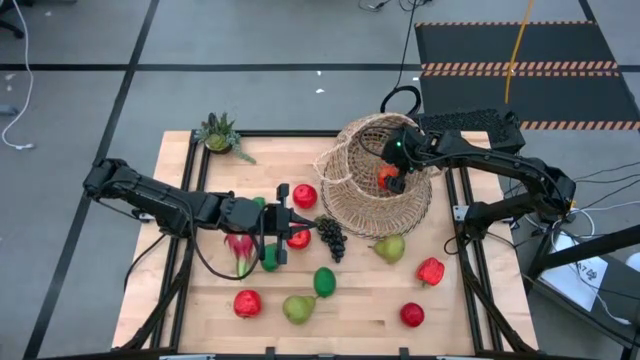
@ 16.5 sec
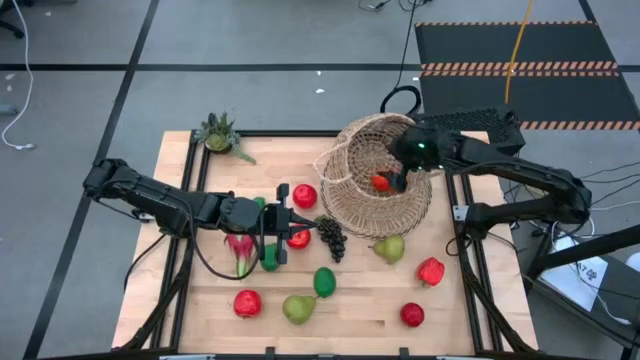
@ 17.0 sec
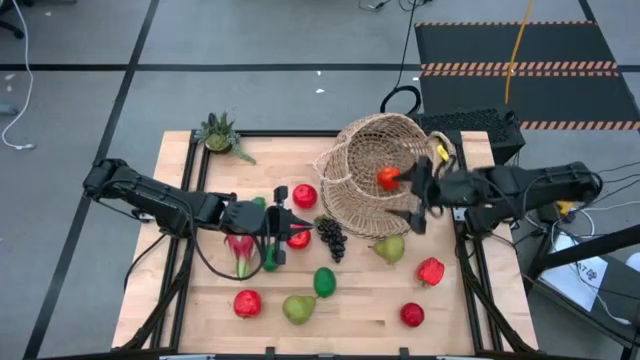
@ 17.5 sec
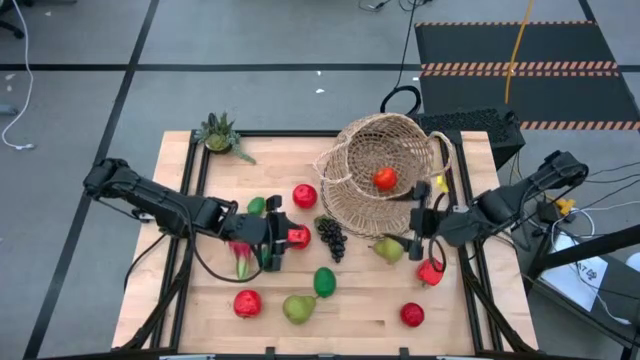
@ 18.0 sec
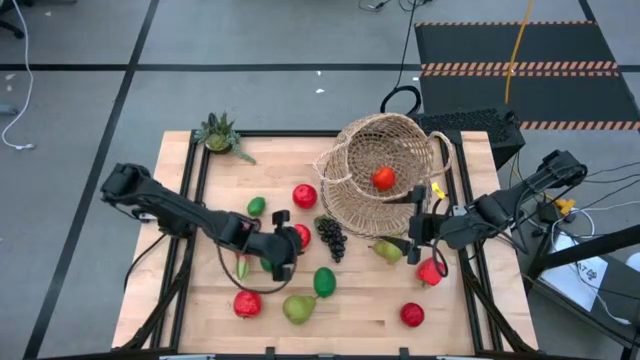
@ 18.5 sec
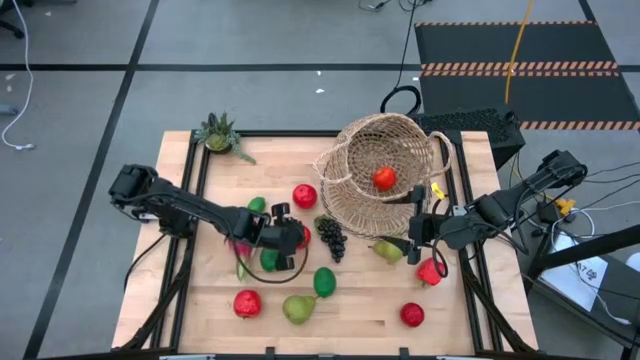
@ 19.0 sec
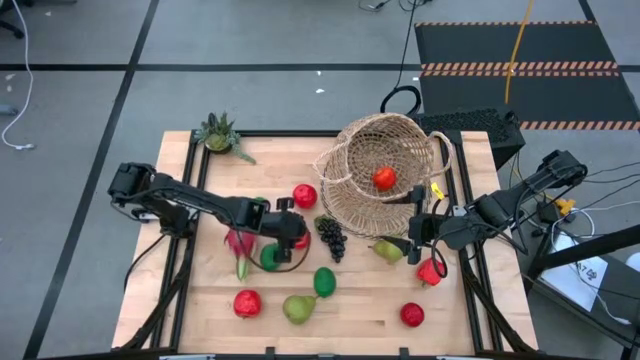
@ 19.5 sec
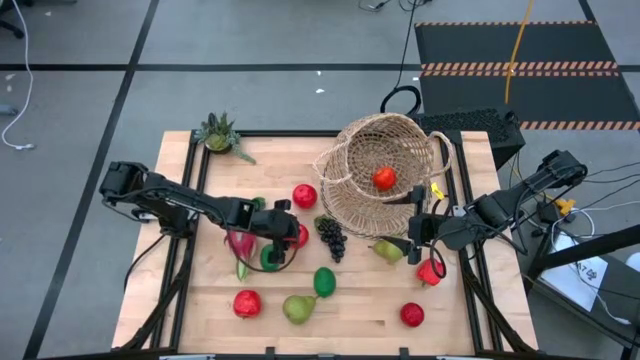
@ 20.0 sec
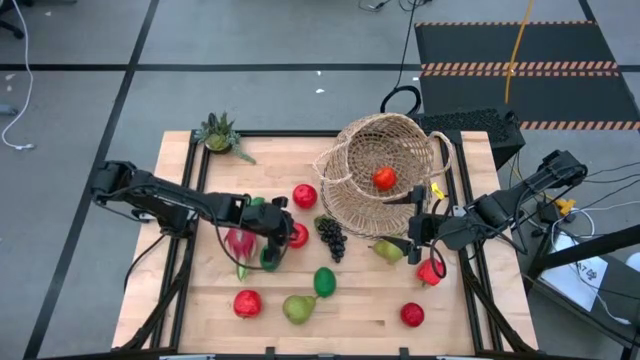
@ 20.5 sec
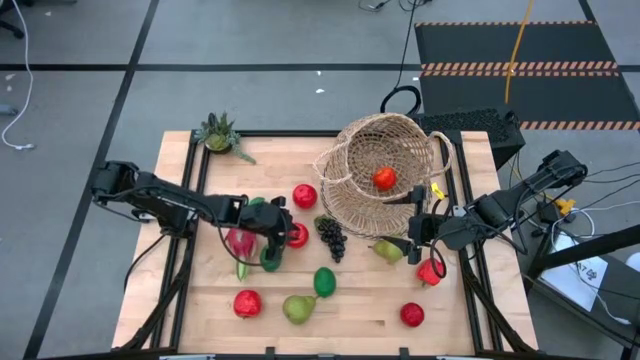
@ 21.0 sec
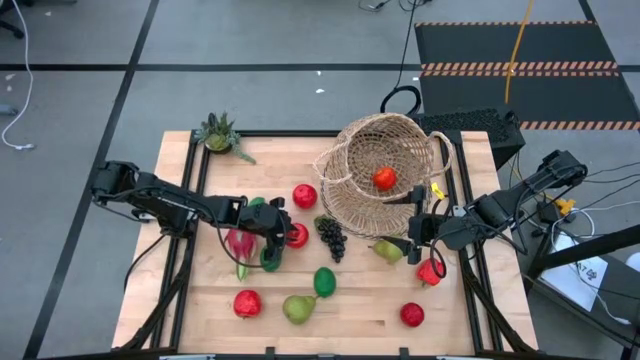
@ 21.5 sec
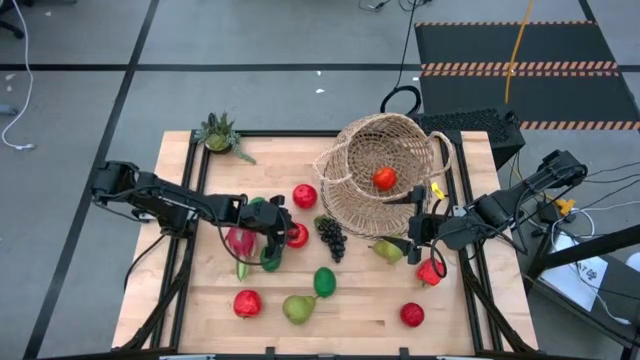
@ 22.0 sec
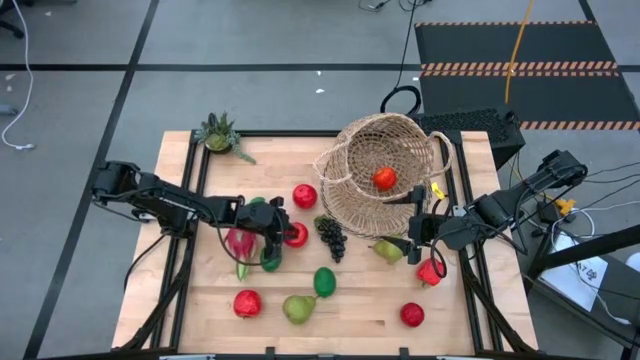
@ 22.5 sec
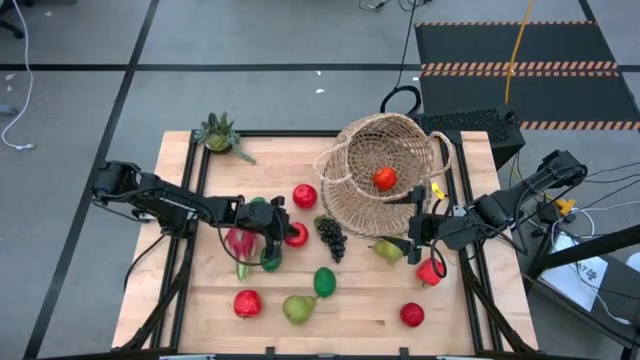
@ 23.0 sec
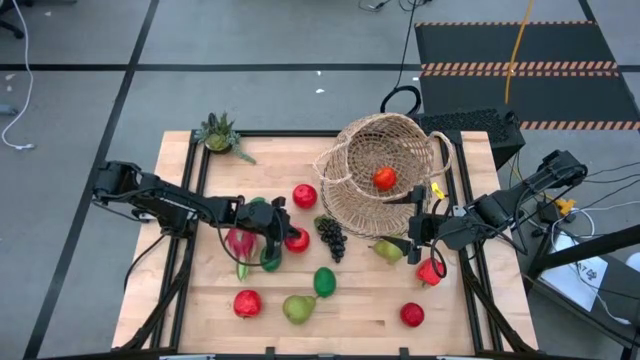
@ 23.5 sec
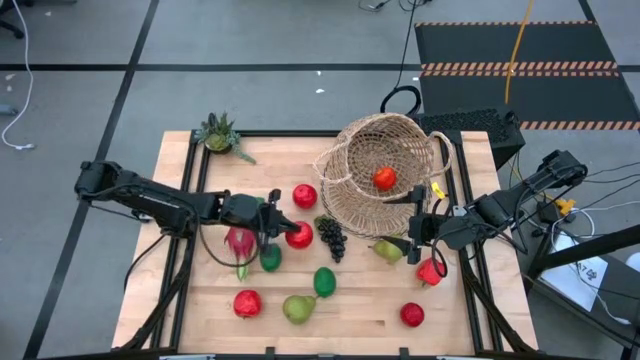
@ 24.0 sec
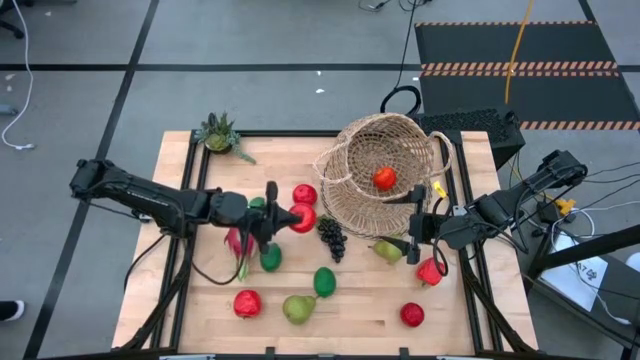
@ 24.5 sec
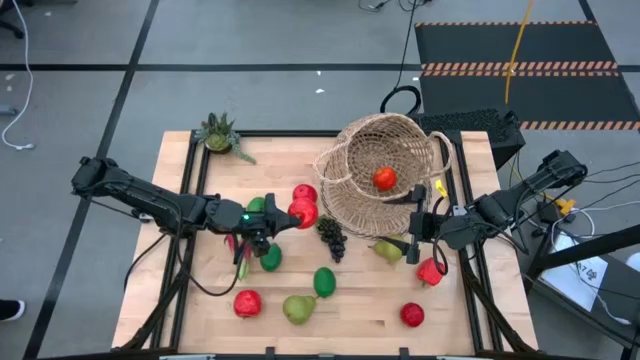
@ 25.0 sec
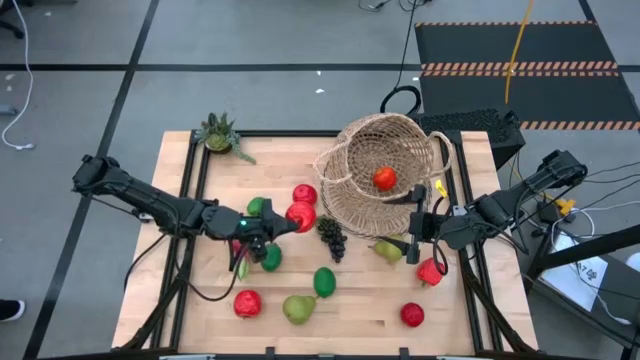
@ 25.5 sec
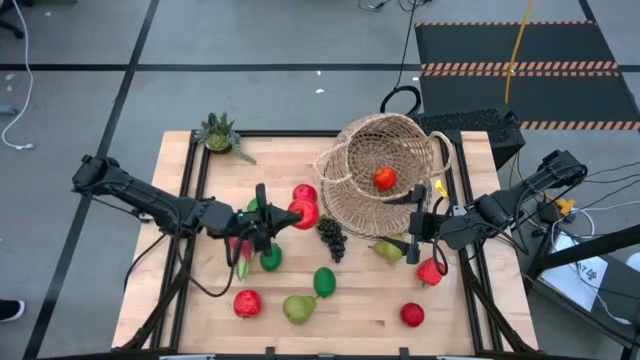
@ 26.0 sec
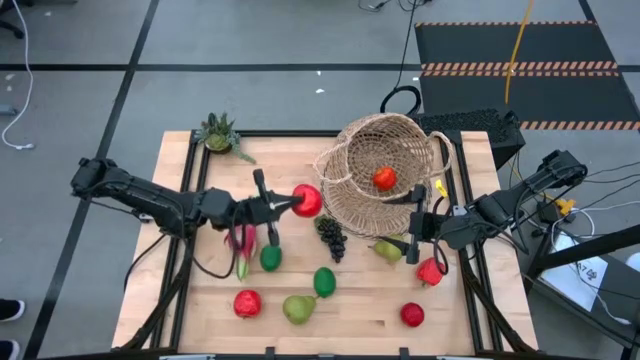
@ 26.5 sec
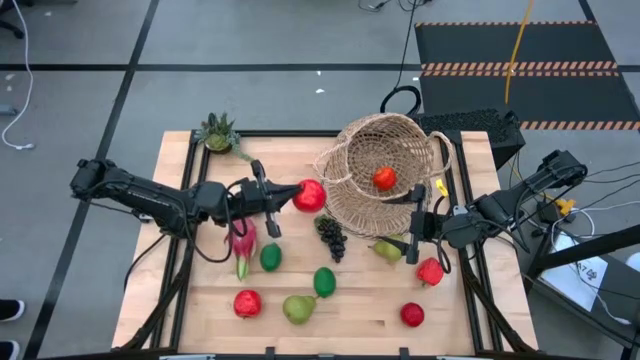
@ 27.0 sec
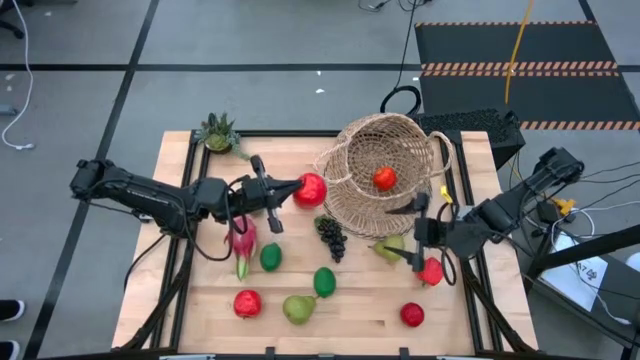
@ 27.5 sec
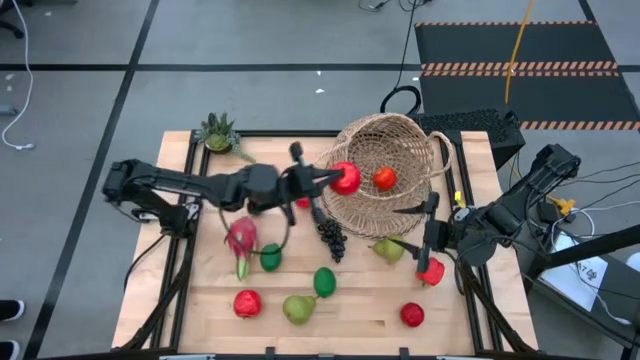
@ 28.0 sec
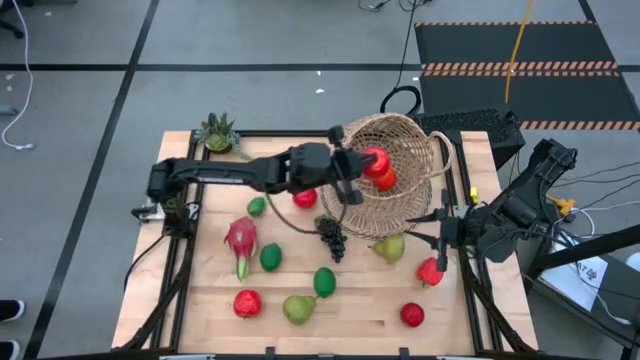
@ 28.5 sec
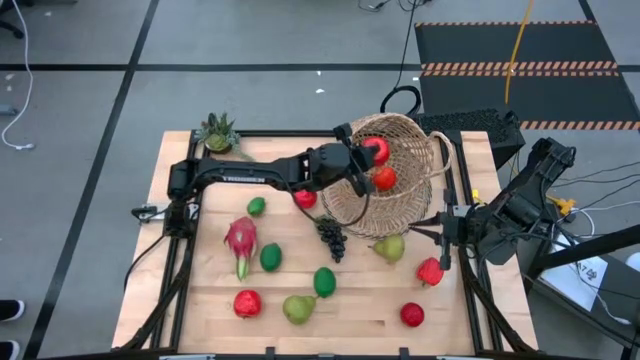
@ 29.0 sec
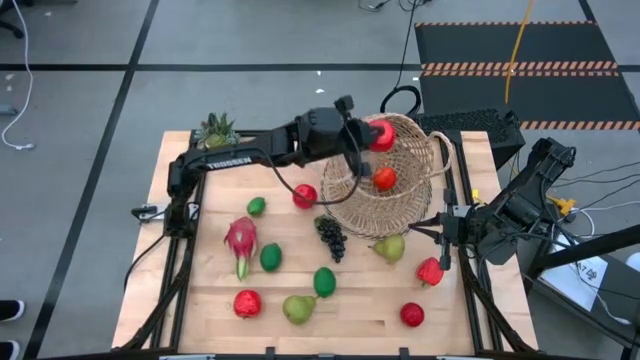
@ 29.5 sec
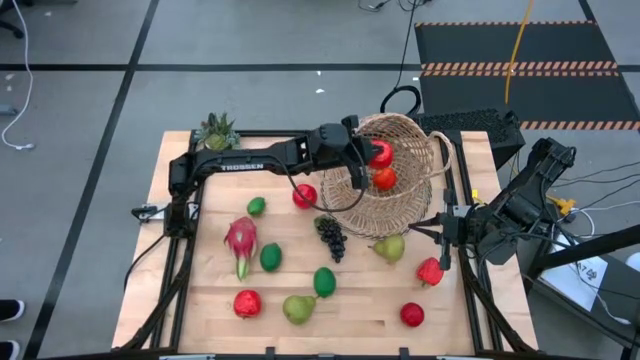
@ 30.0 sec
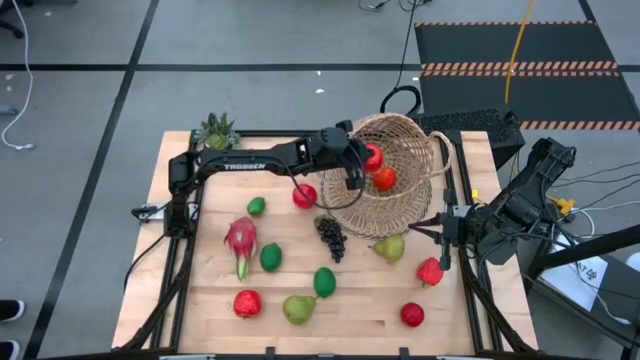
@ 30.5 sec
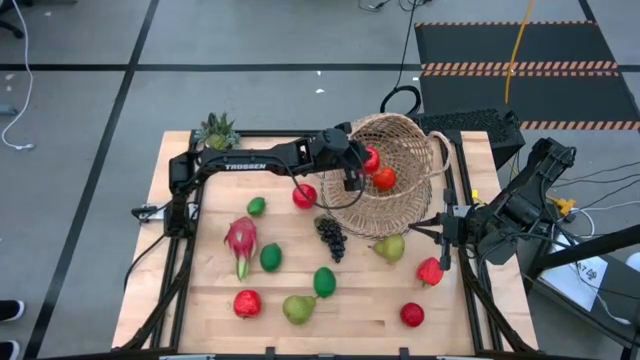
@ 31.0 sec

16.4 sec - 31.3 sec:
Task: Build produce basket
Put the red apple into the brown basket

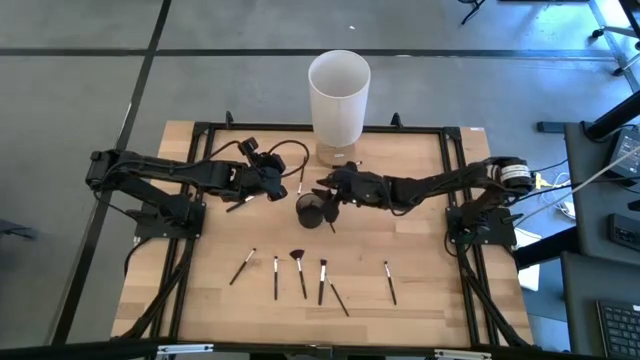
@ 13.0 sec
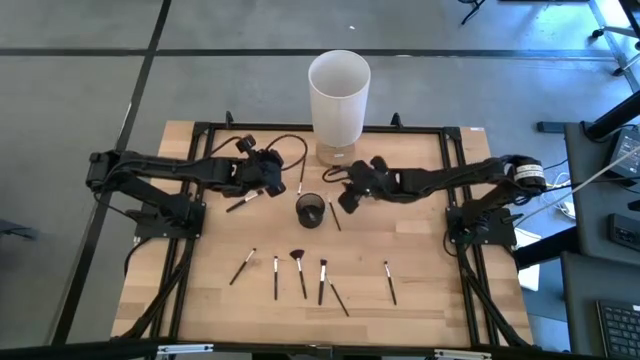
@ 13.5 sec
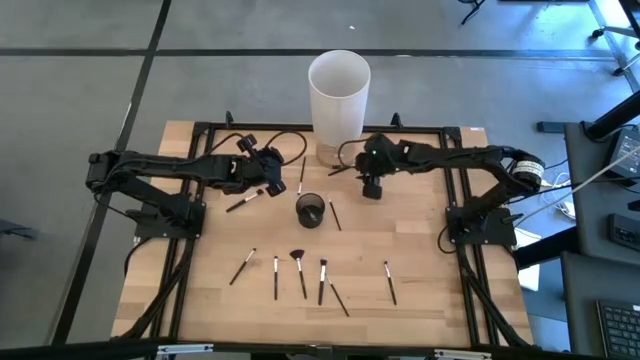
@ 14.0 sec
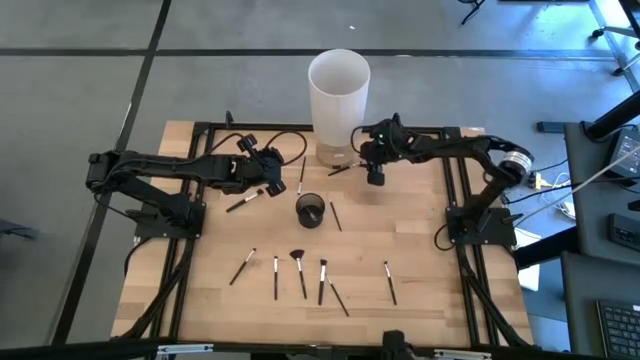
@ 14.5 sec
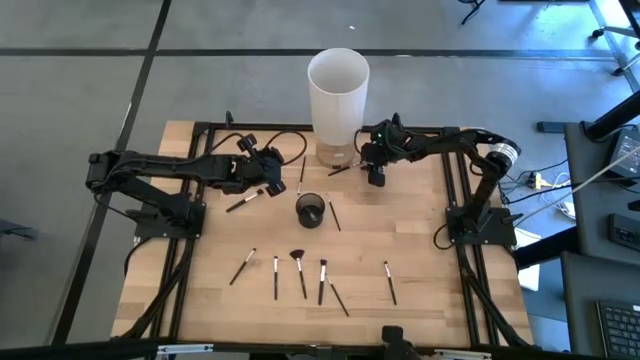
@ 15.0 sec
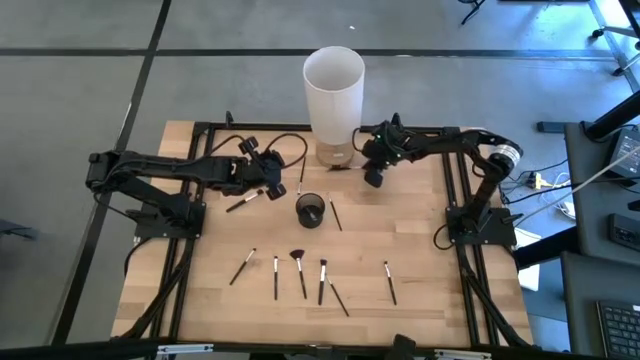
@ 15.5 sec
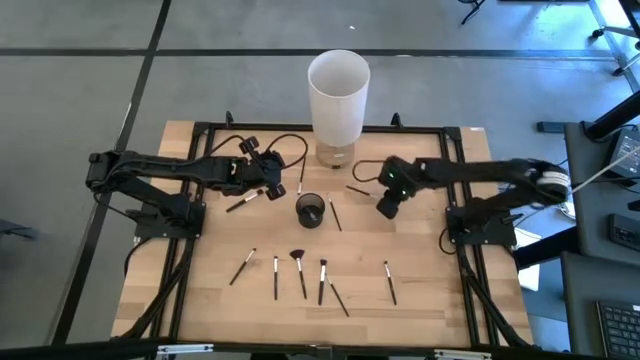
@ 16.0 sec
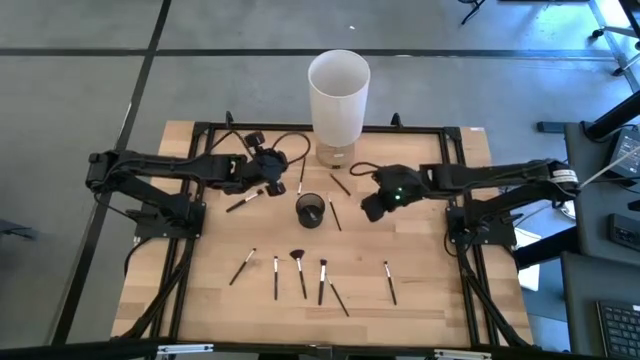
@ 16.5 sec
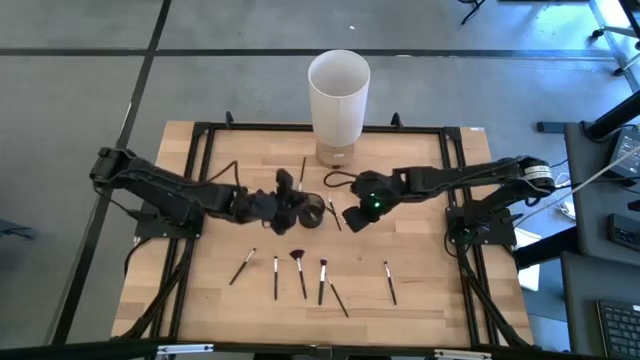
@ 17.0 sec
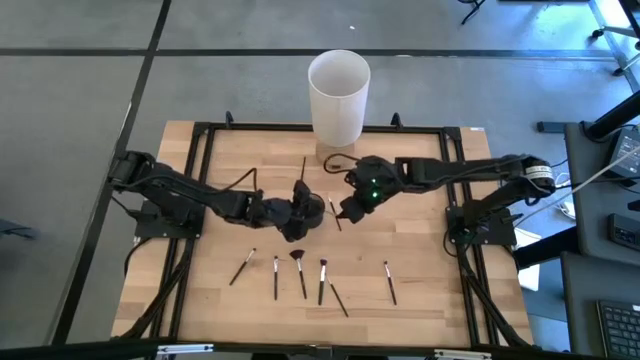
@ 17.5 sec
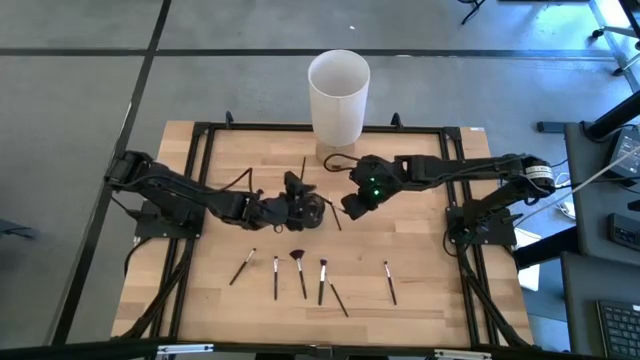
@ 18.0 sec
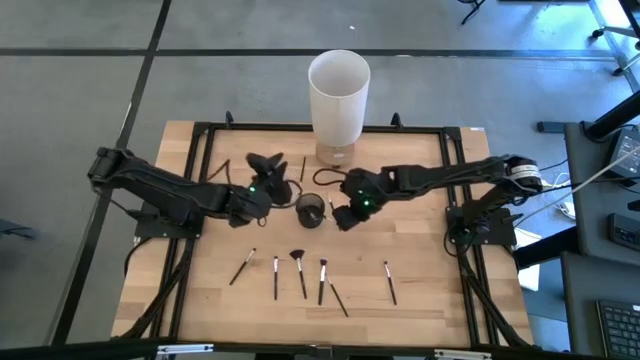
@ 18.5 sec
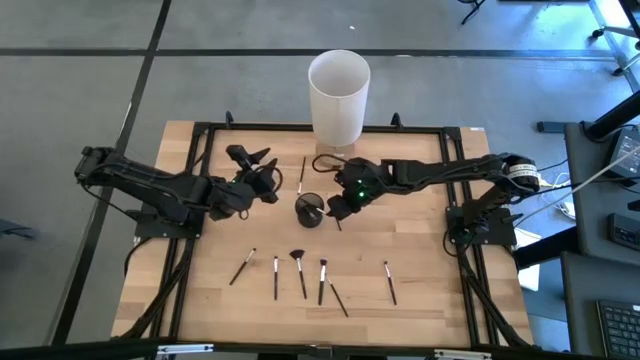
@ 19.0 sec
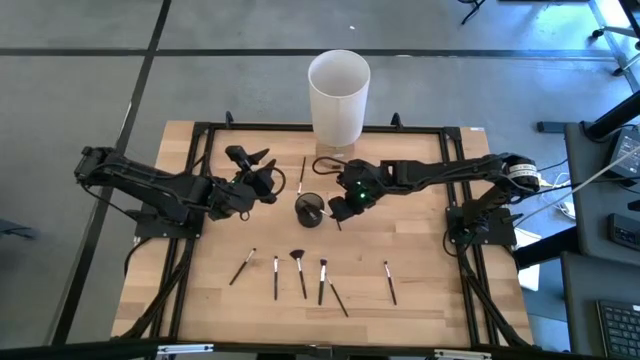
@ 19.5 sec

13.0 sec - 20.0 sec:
Task: Put items in baskets/containers
Put the black eyeshadow brush into the black pen holder
